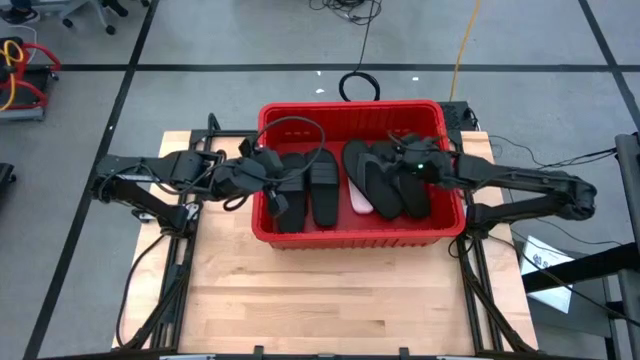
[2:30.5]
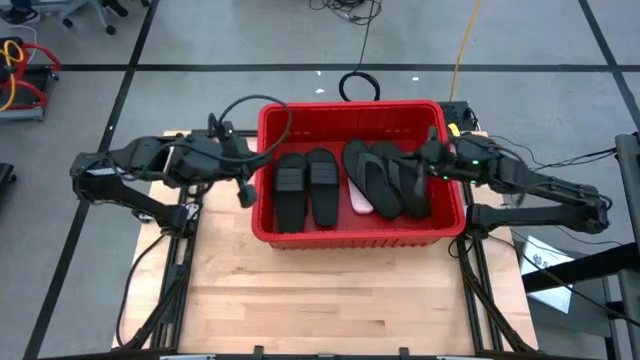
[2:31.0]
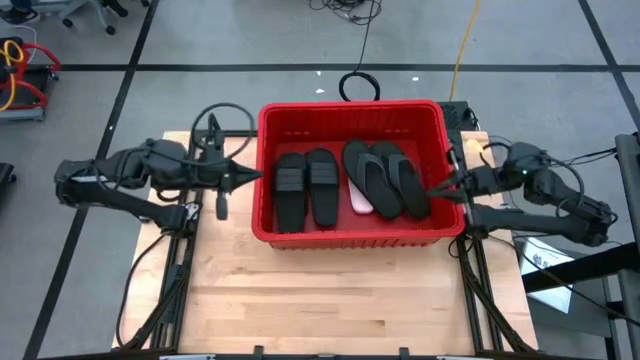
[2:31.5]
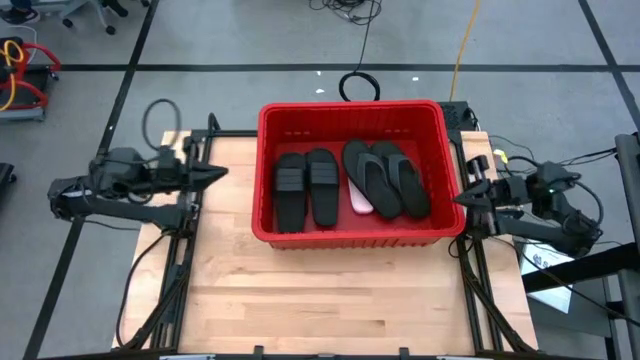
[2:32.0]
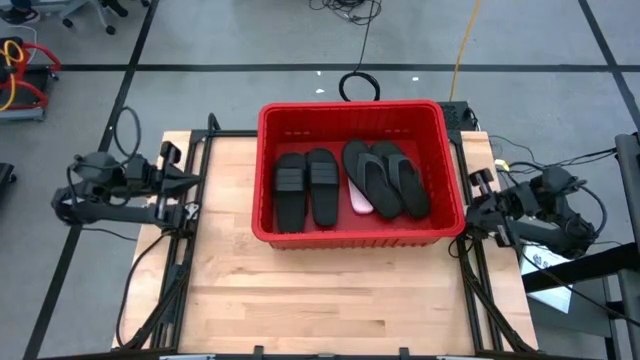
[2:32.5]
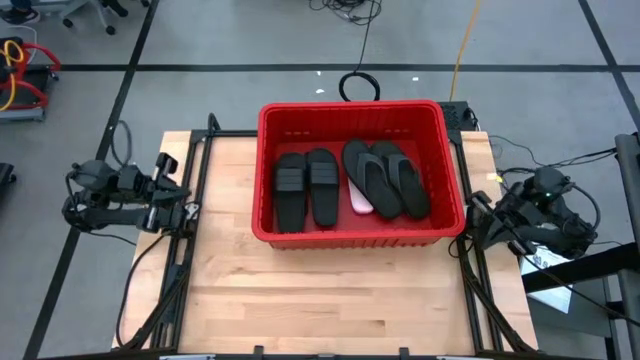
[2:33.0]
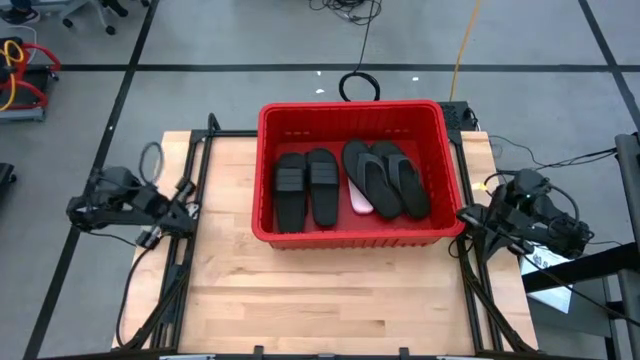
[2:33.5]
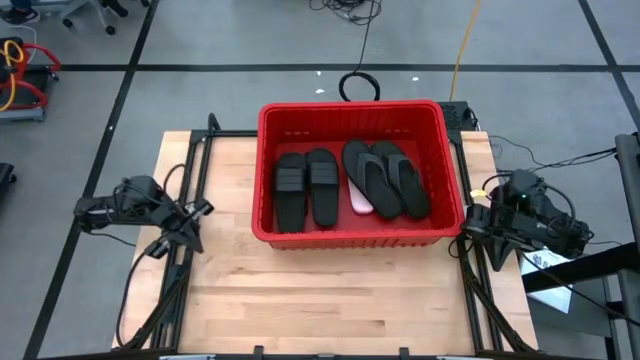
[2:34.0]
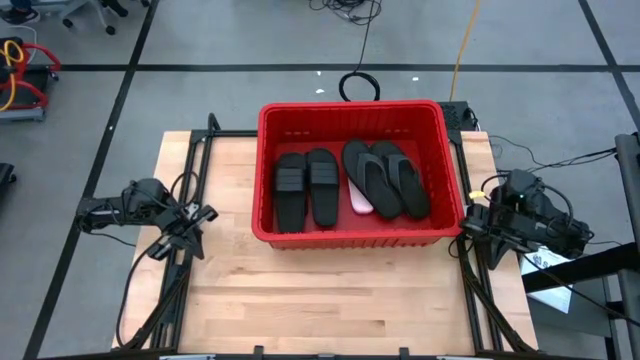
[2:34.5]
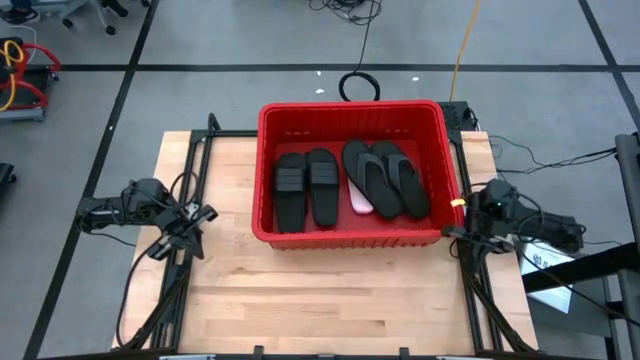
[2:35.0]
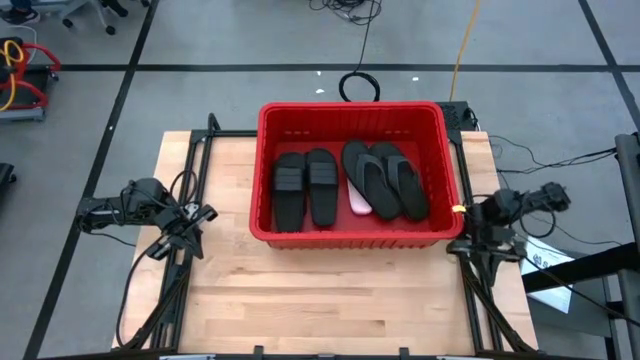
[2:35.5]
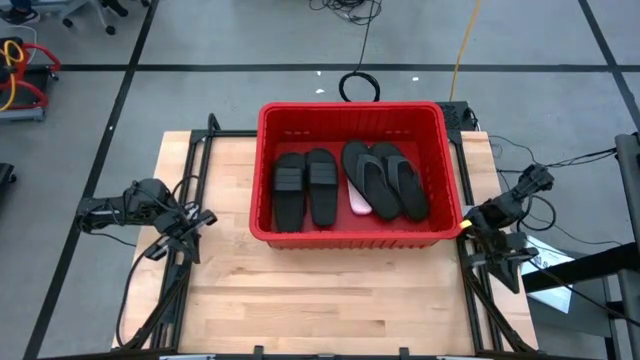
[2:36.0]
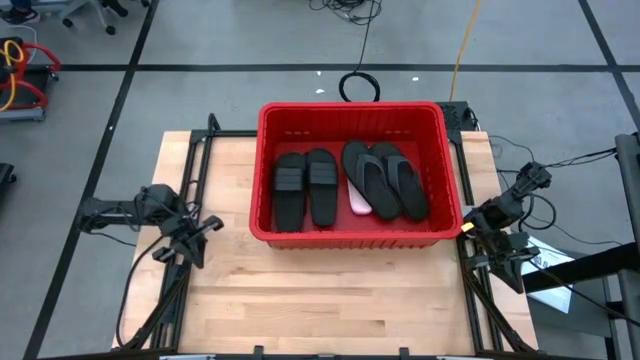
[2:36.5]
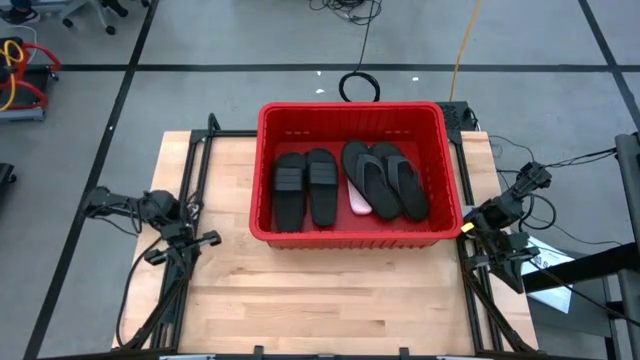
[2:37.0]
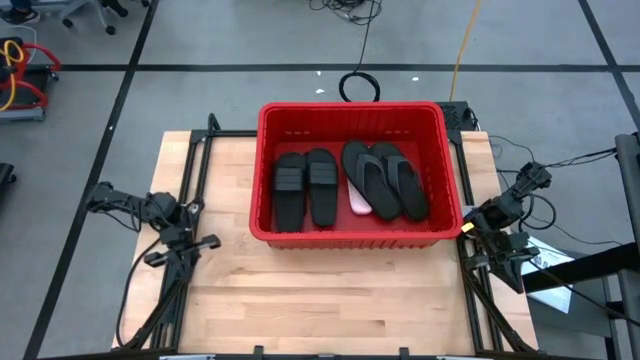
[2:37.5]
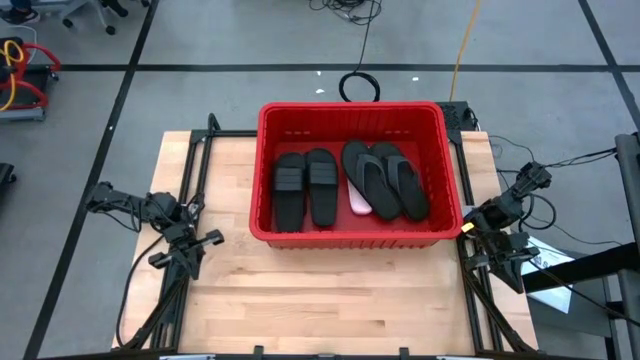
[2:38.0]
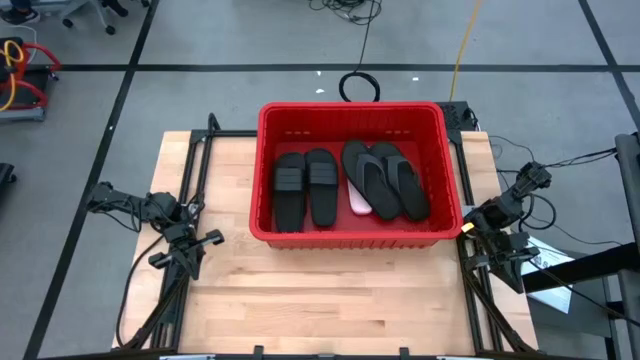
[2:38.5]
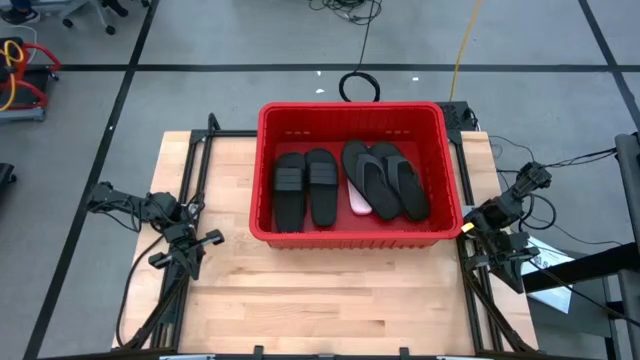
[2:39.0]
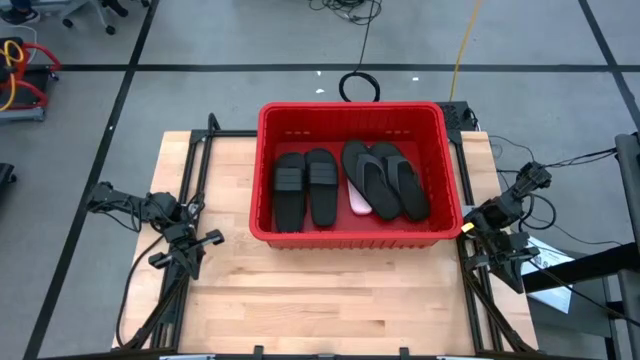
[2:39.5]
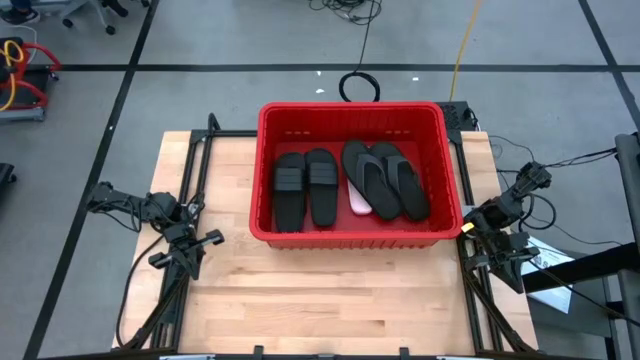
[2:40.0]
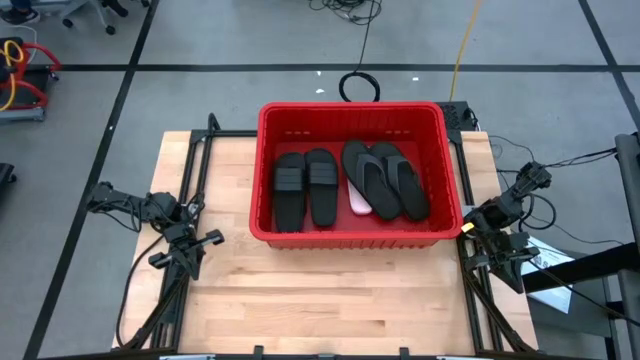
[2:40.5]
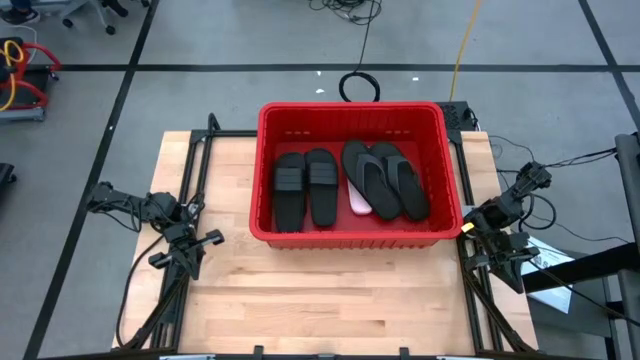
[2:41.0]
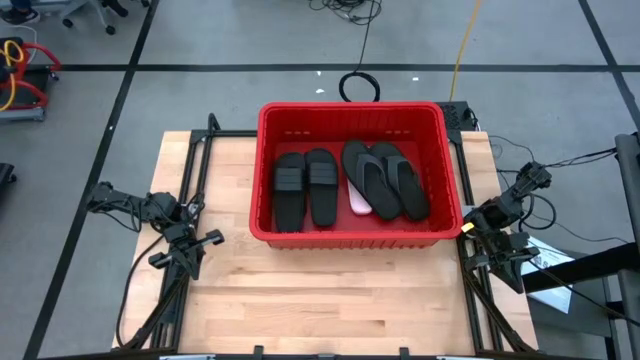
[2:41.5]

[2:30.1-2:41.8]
Task: Pick and place slides into bin
Return to Home Position

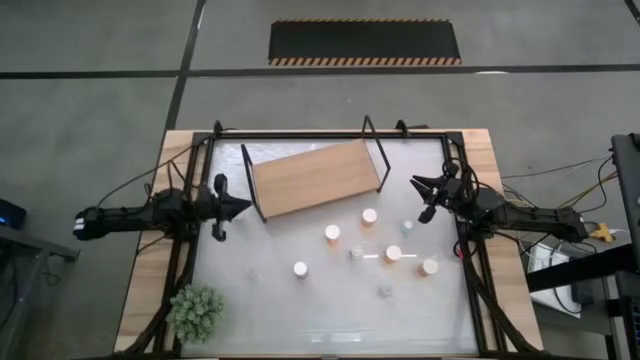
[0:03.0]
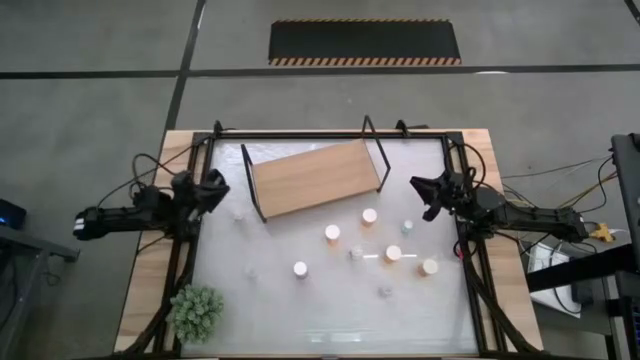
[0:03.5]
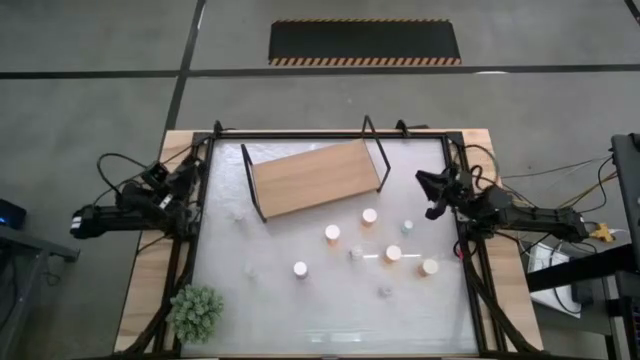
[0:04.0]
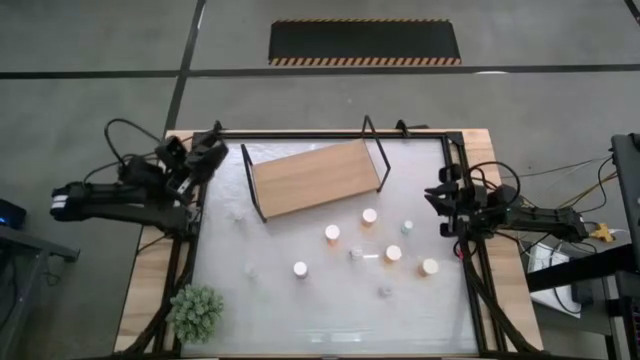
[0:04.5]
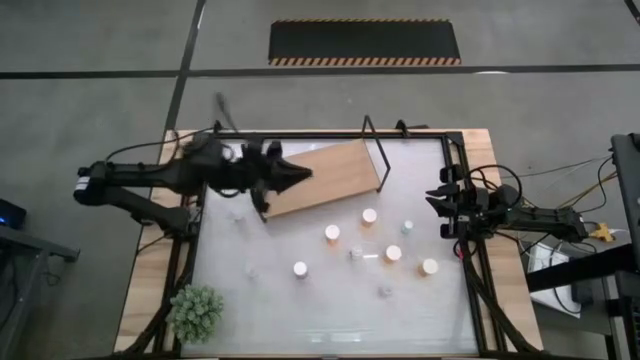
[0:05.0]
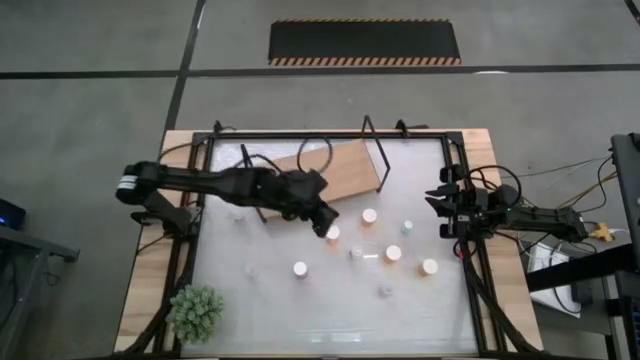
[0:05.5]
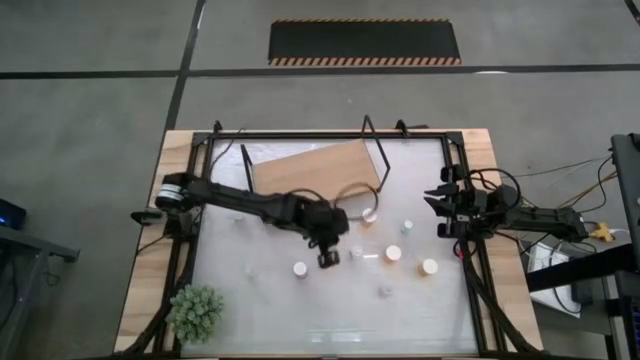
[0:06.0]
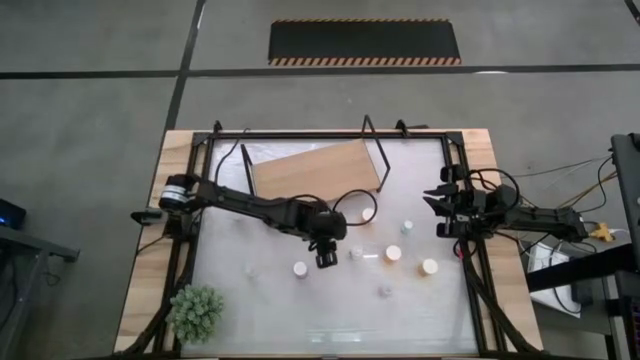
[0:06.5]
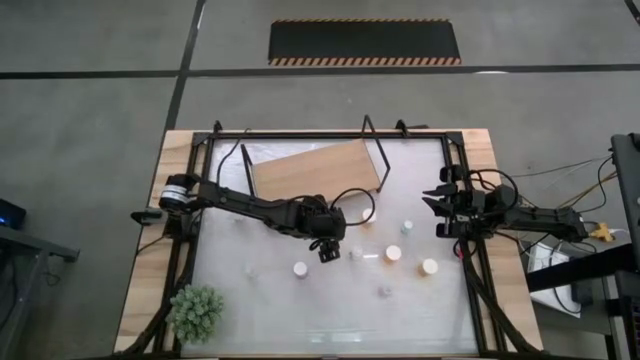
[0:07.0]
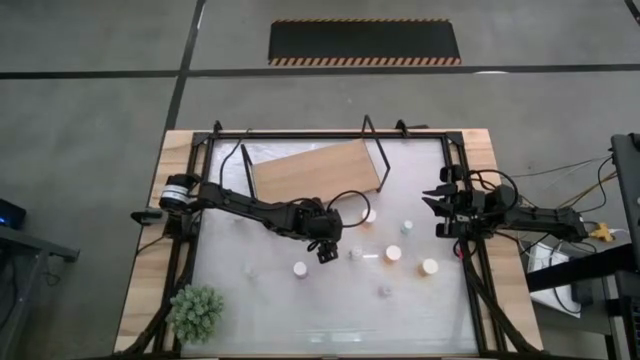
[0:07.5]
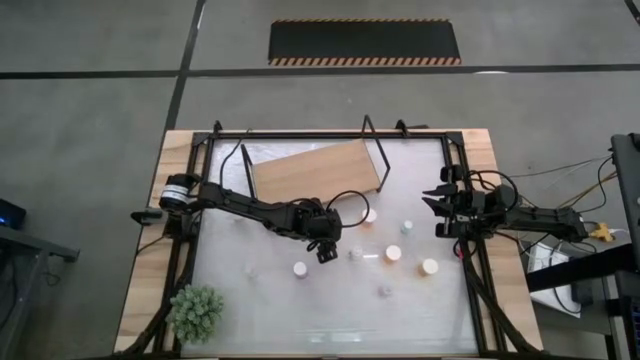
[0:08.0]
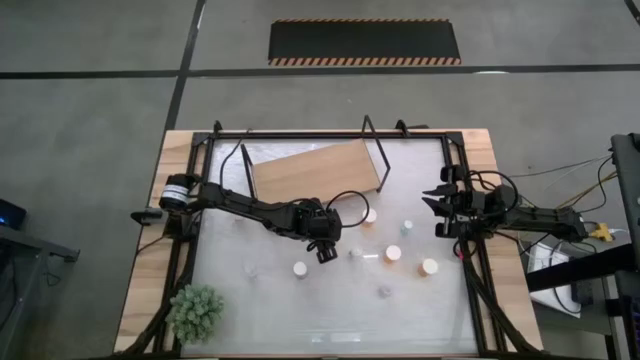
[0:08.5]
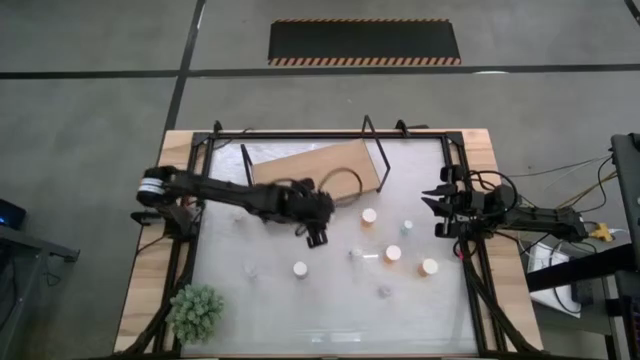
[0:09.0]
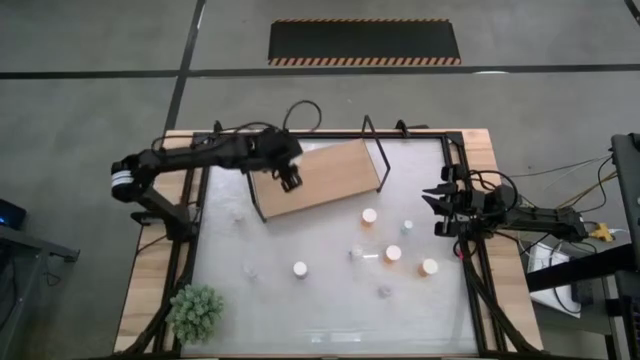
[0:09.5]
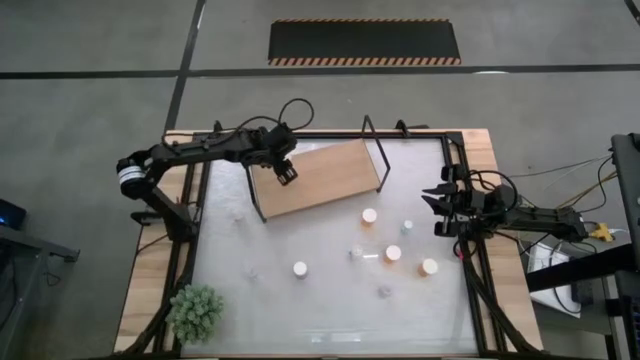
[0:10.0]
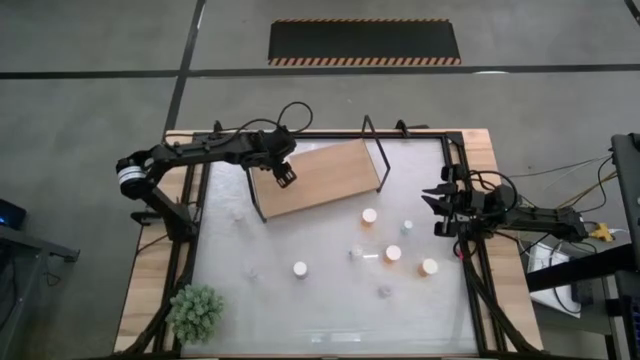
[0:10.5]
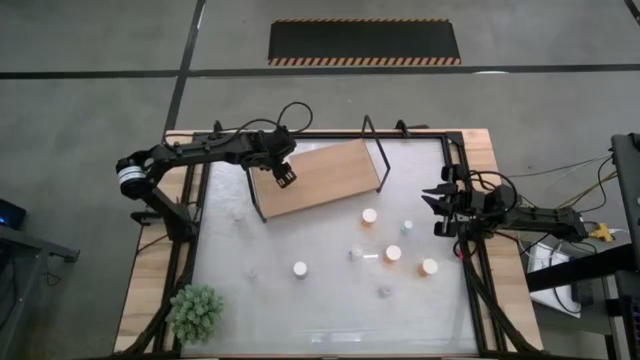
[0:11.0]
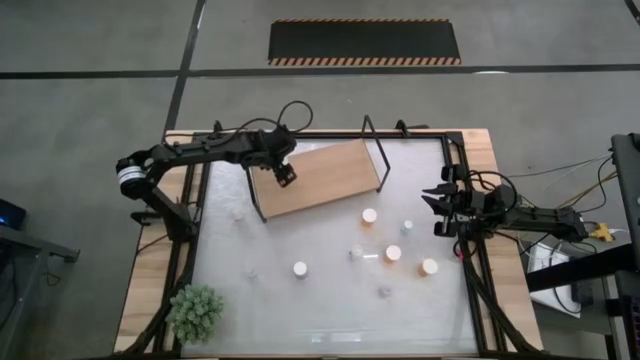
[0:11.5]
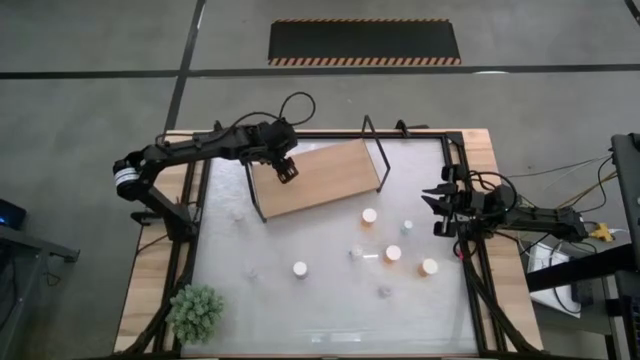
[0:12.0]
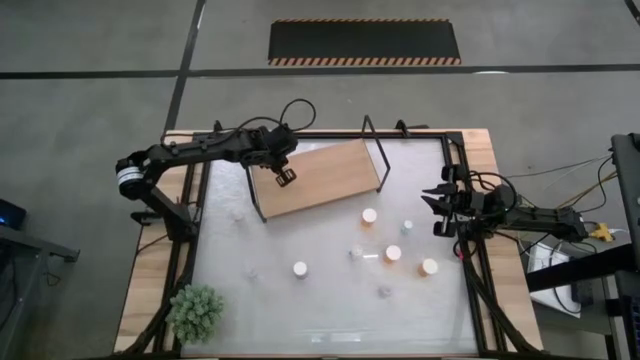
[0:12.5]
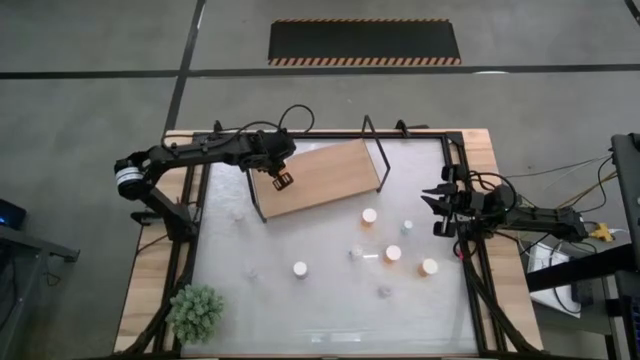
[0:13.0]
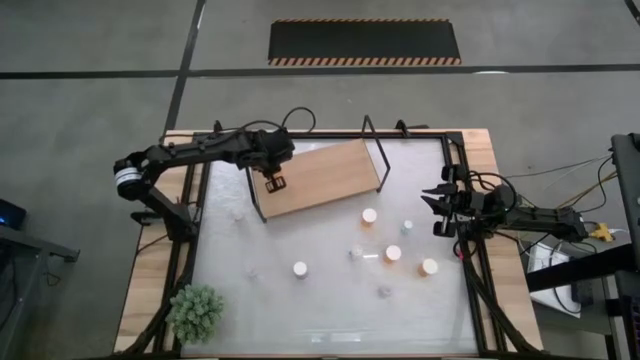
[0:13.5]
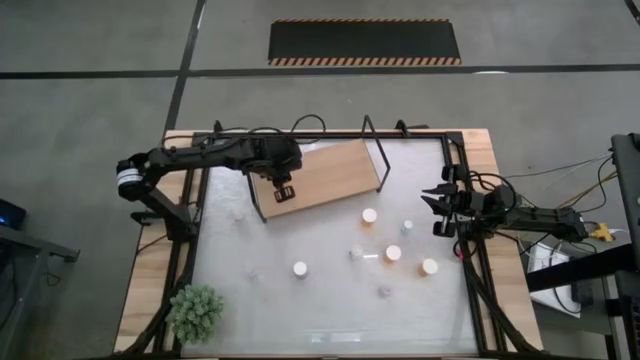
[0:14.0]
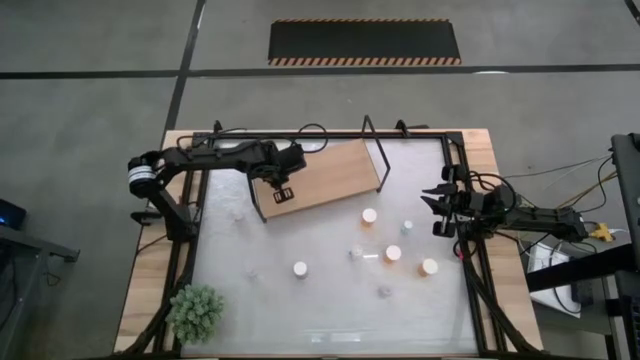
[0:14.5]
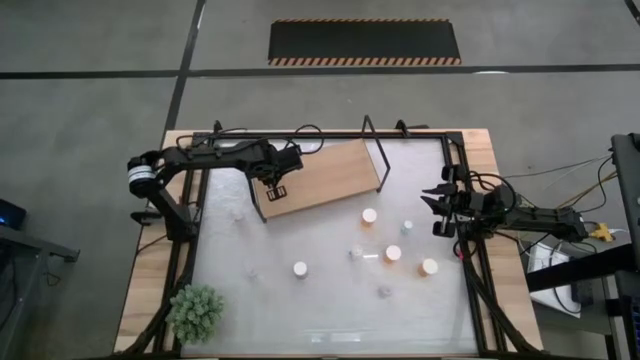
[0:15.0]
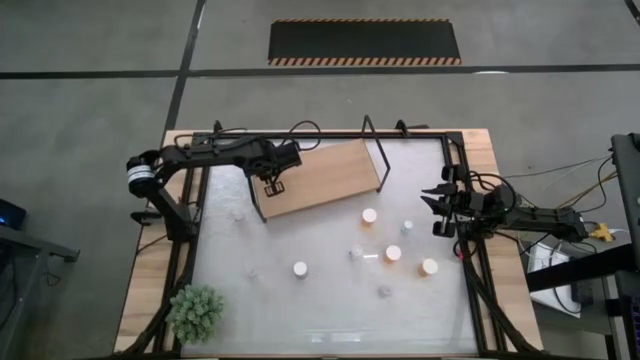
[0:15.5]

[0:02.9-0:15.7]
Task: Pick and place medicine bottles onto shelf by color
Put the left orange pill bottle on the shelf
